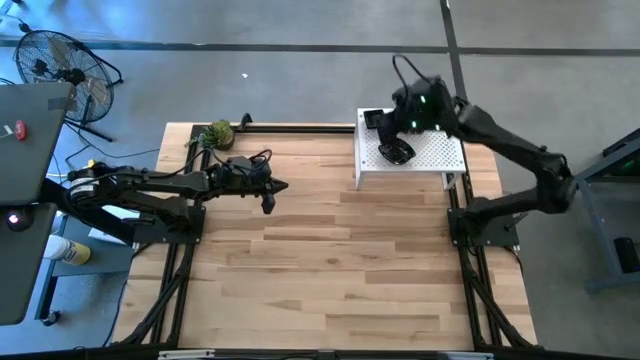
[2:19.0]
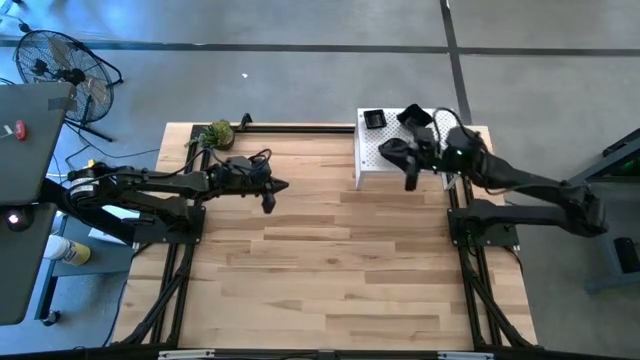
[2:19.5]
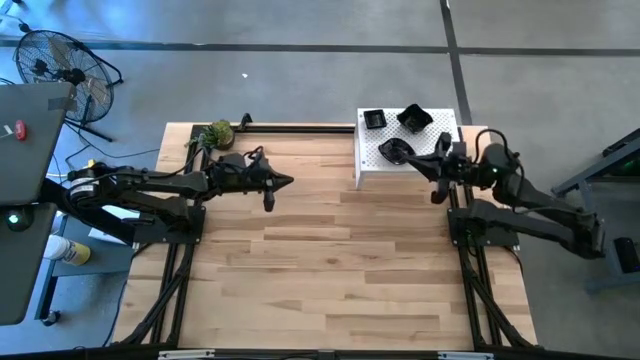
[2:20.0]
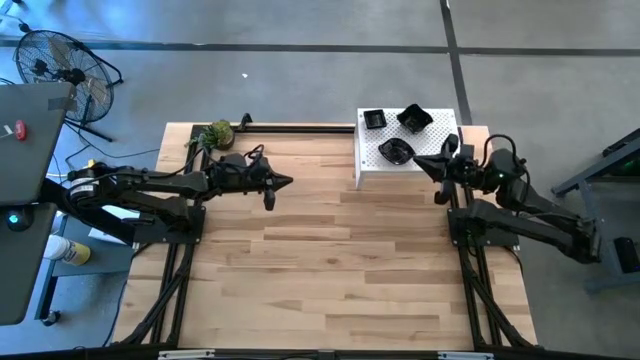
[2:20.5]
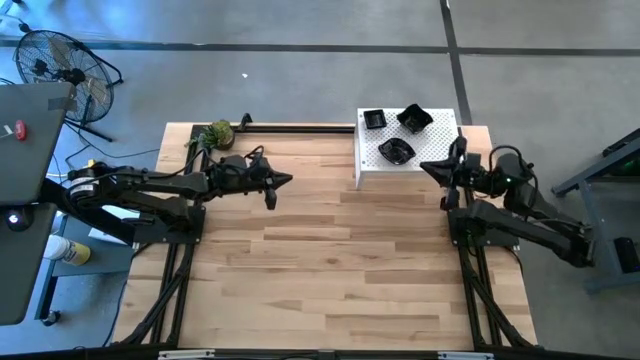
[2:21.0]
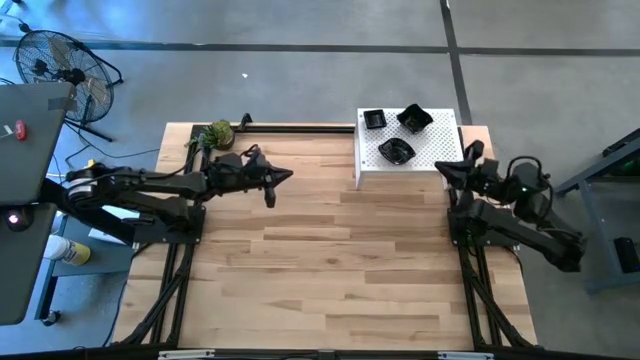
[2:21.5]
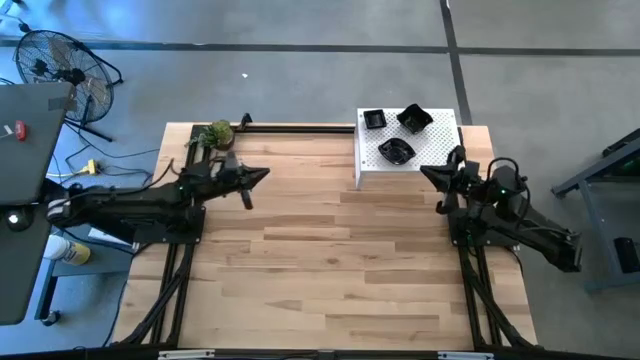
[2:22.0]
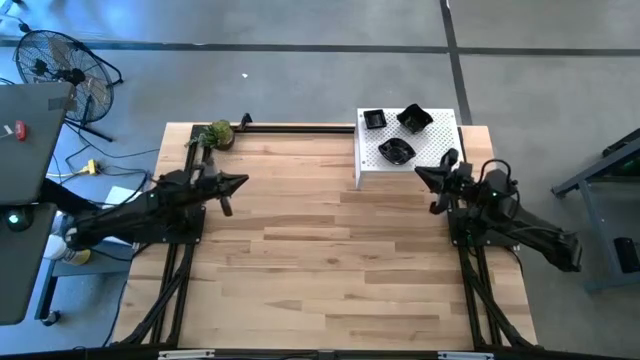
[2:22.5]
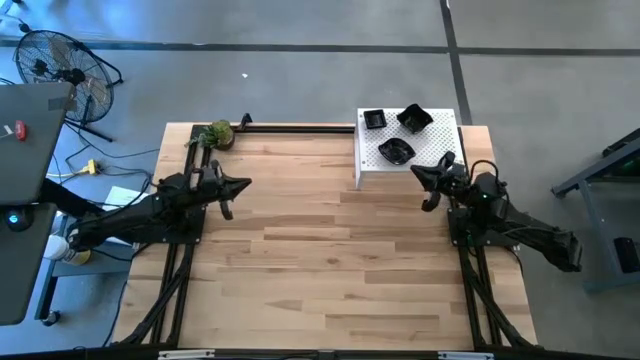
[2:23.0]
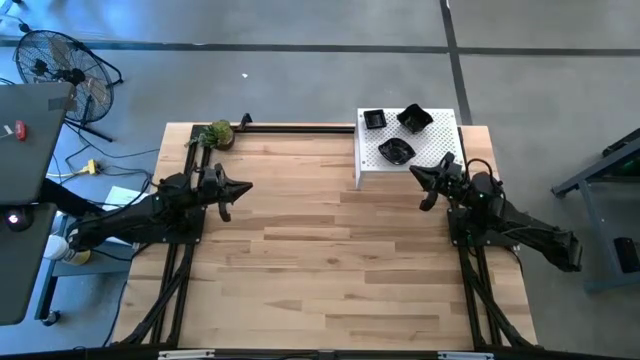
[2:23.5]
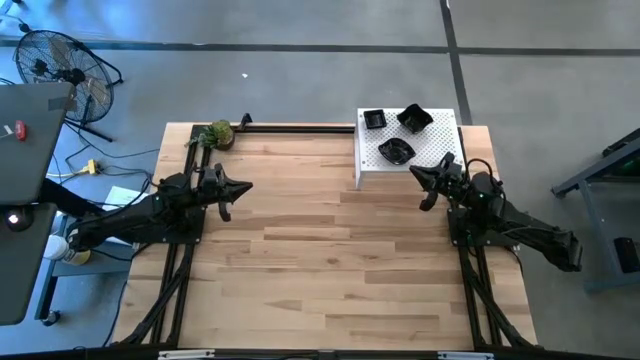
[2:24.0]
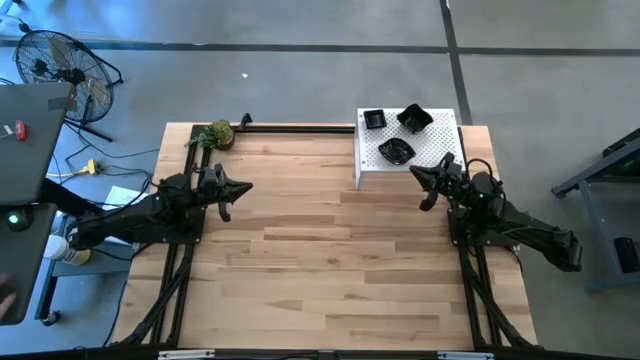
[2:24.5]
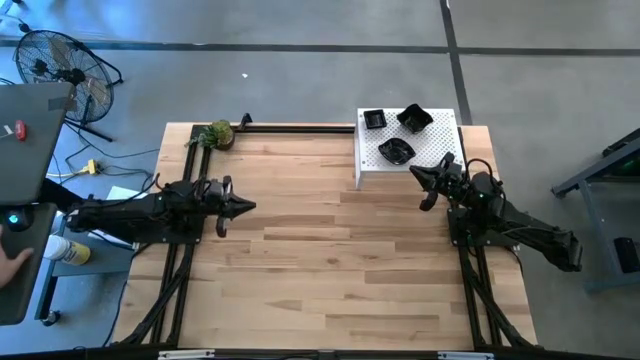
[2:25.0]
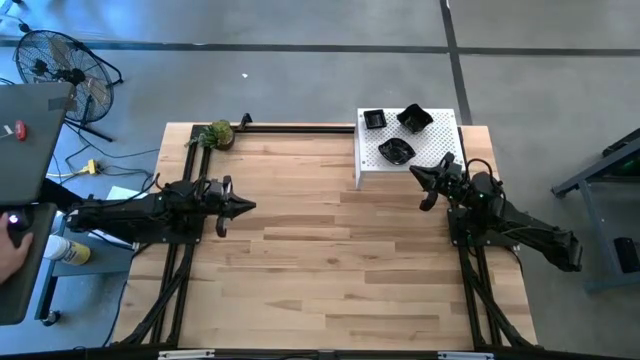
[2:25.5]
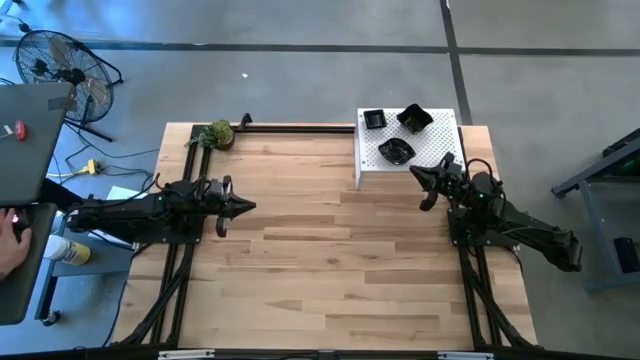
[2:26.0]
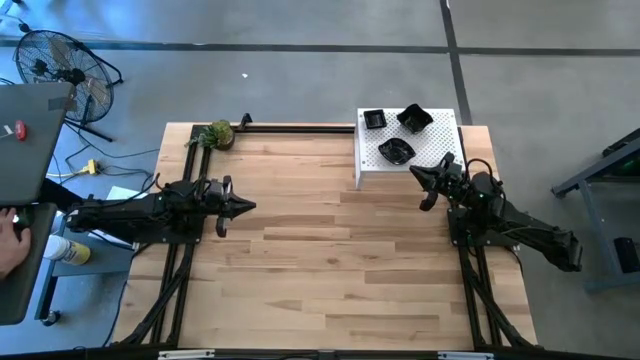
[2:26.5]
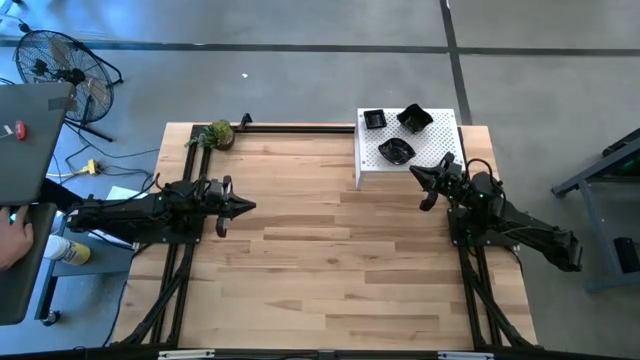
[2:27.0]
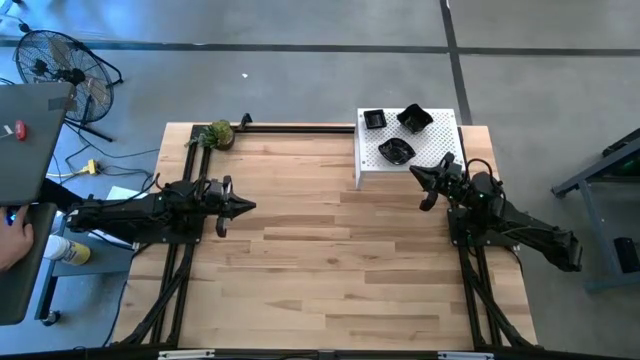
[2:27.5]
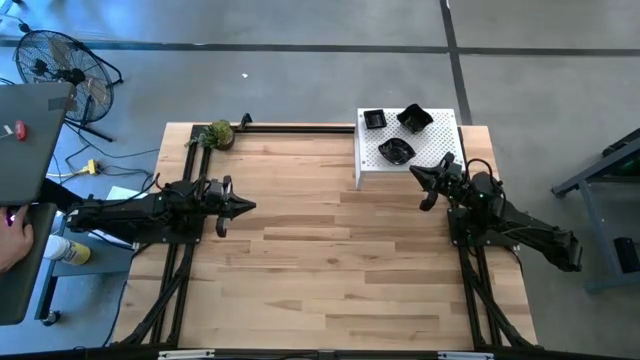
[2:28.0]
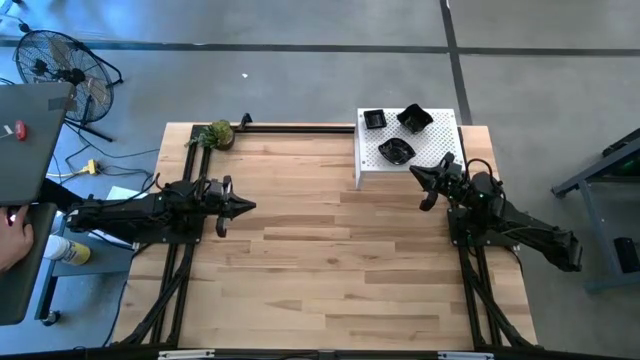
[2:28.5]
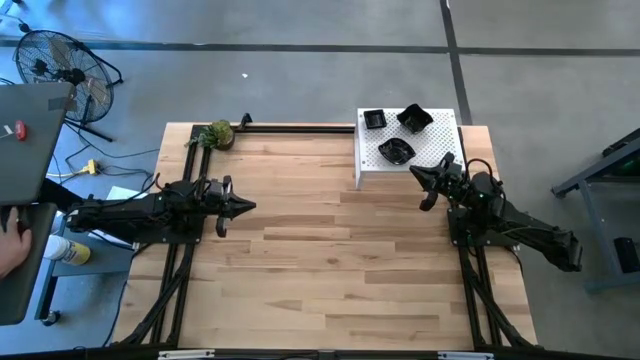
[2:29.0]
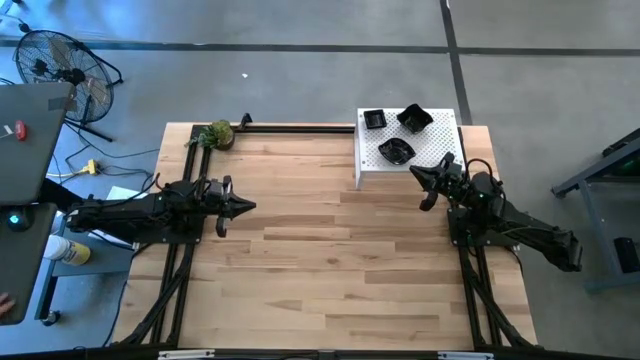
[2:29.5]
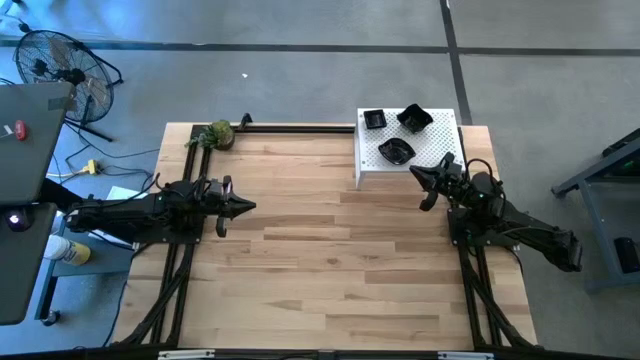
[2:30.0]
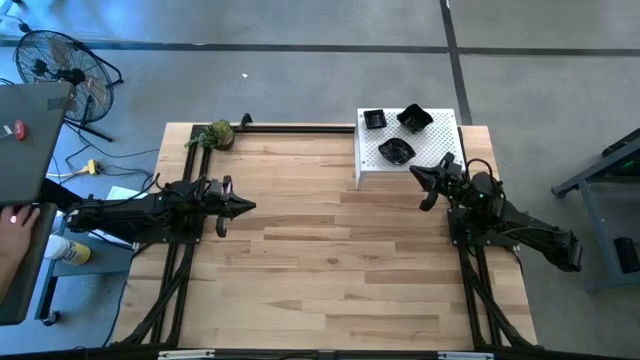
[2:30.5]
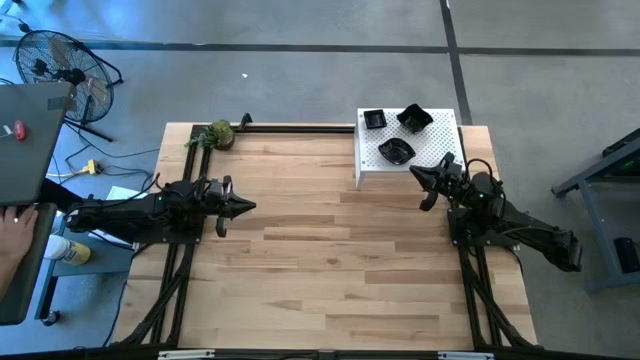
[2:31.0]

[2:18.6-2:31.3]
Task: Pick & Place Mini shaped plates
Return to Home Position

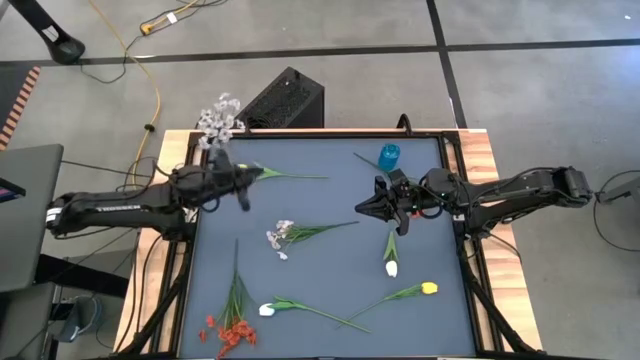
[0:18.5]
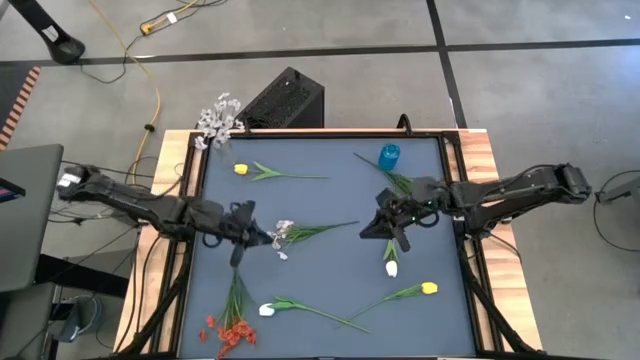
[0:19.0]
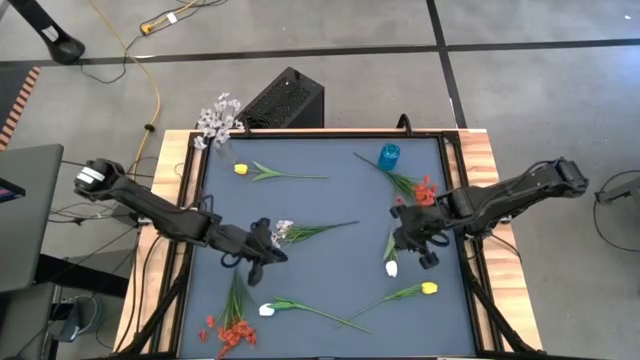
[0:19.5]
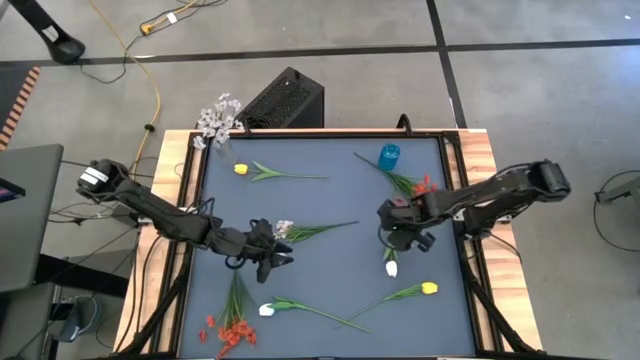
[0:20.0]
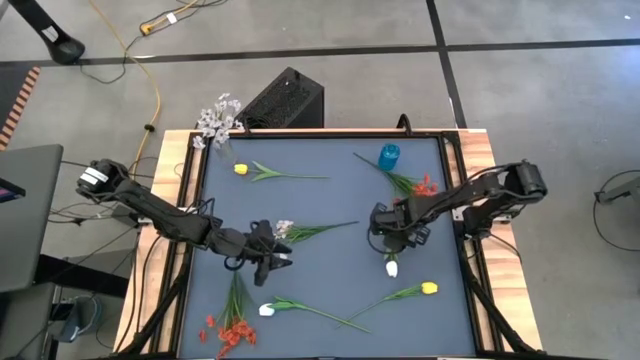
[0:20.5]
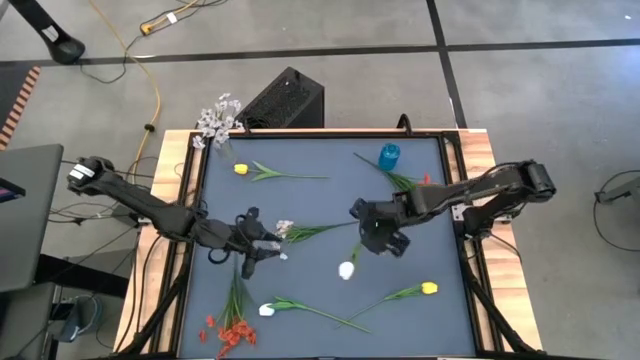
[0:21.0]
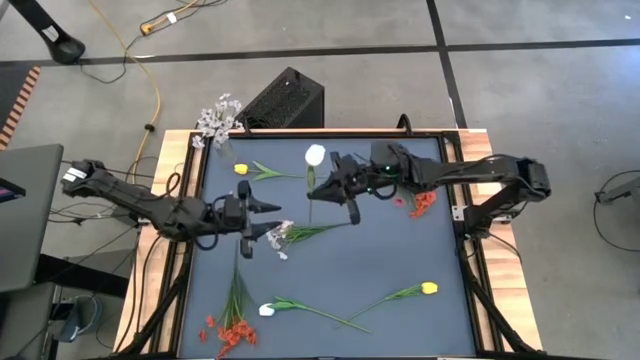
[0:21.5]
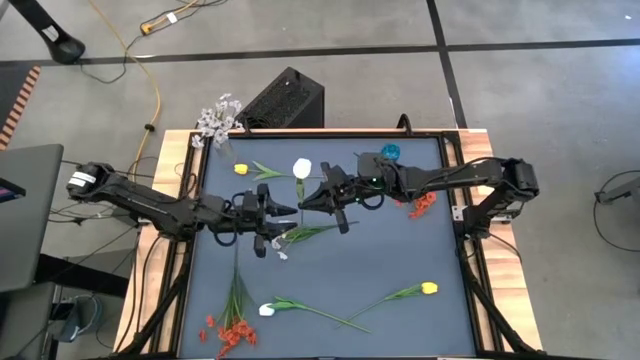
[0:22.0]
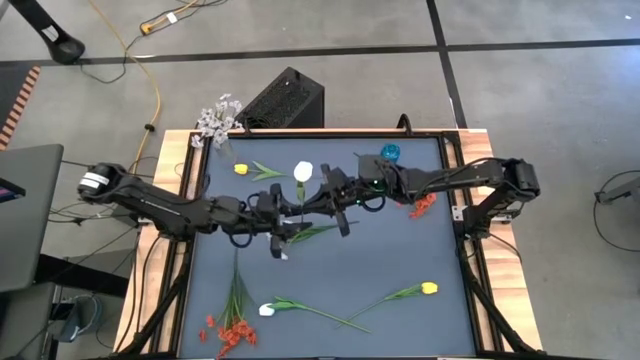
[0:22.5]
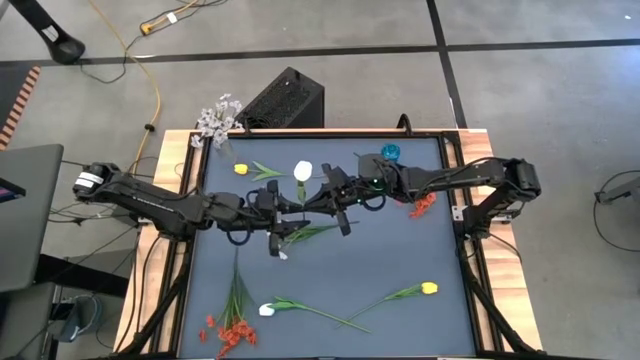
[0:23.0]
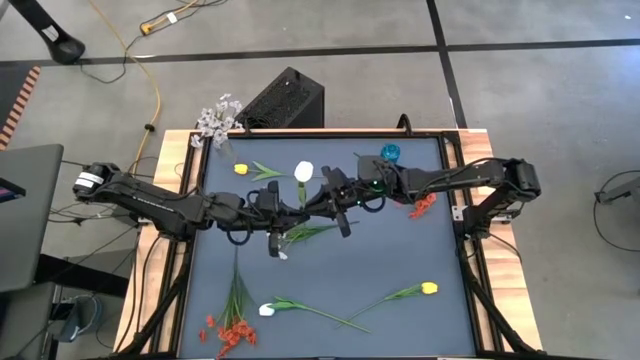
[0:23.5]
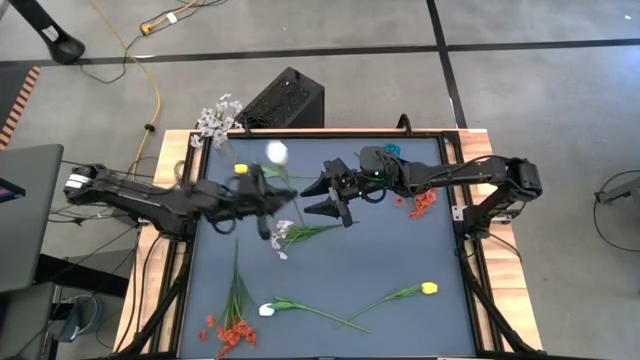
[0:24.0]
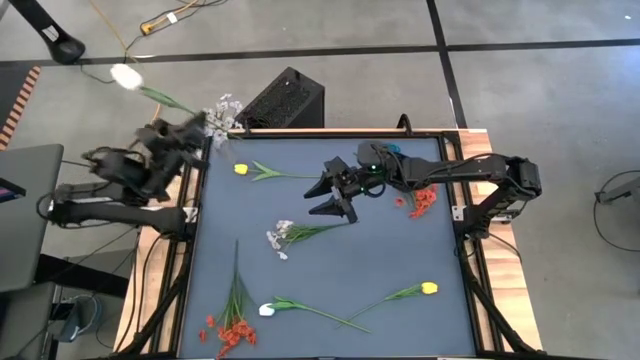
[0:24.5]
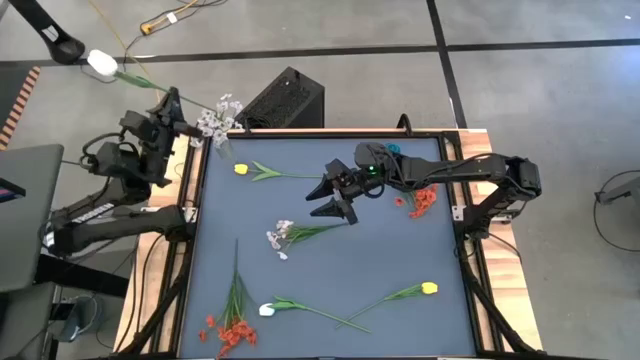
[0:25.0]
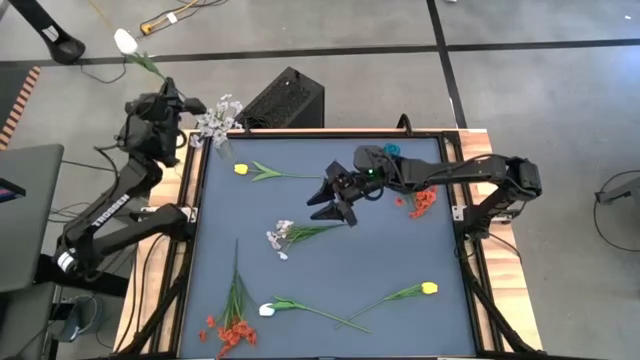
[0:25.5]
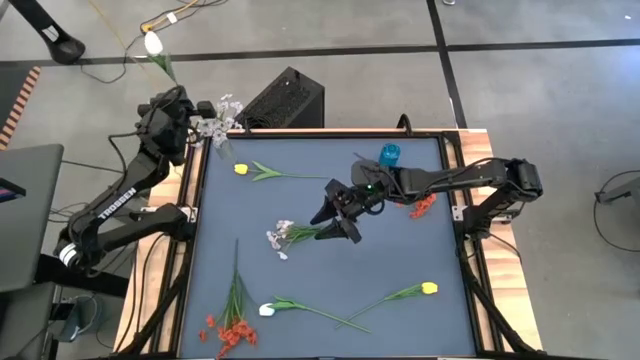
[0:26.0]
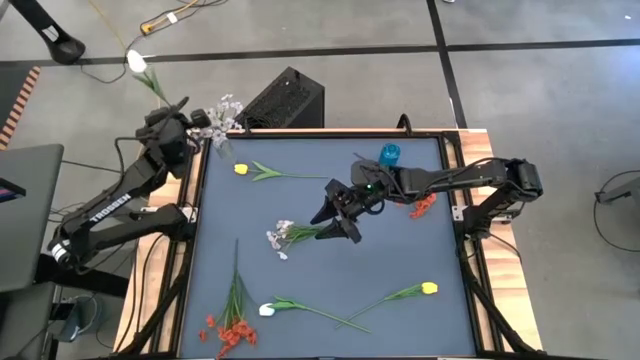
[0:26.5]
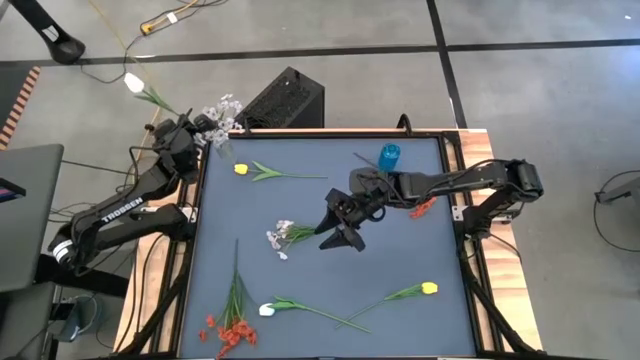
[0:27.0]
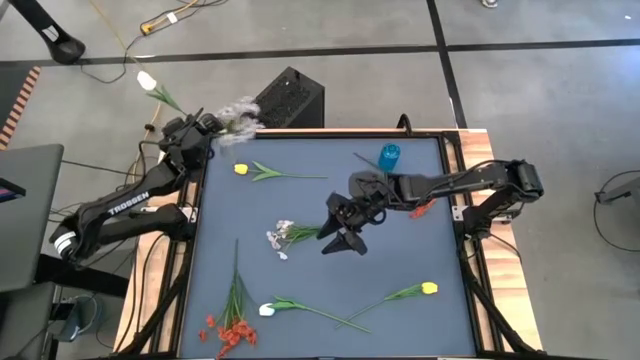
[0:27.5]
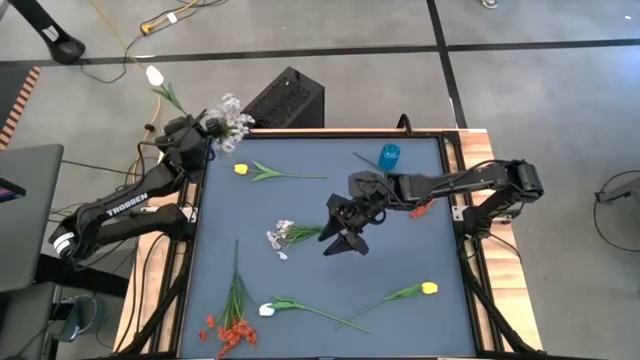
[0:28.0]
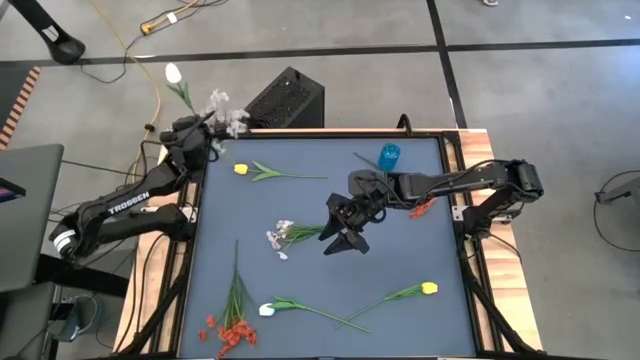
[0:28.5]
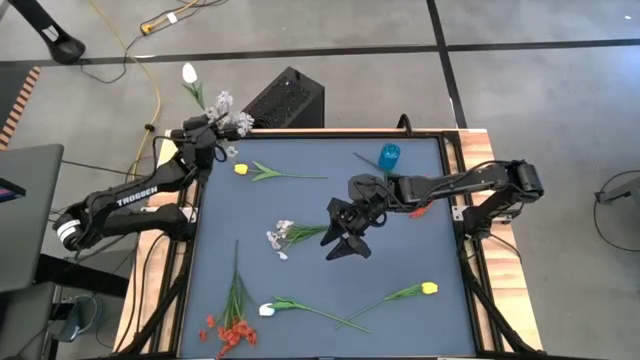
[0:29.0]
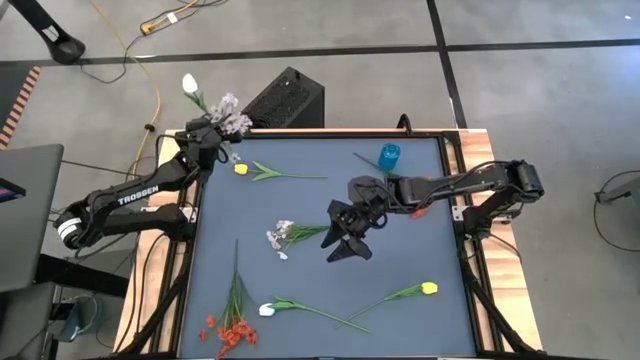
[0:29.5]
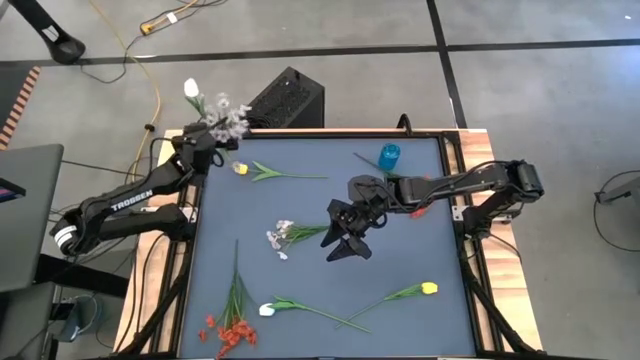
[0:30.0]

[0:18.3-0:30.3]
Task: Sort flowers into vase by color
Put the top white flower into the transparent vase
